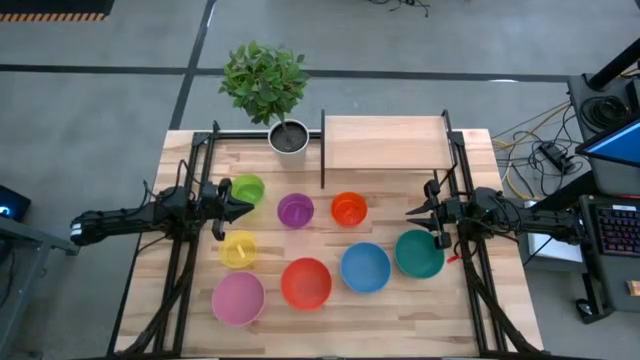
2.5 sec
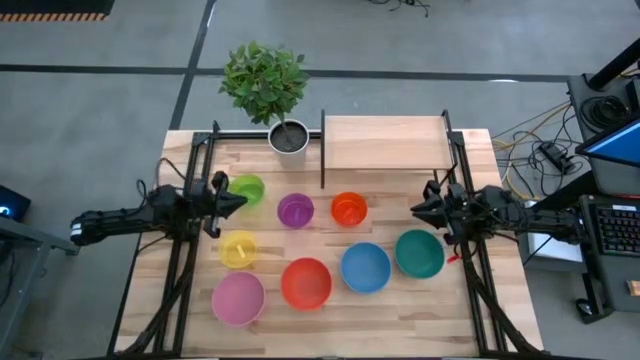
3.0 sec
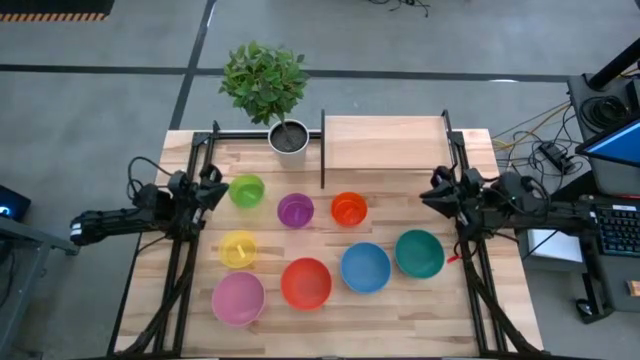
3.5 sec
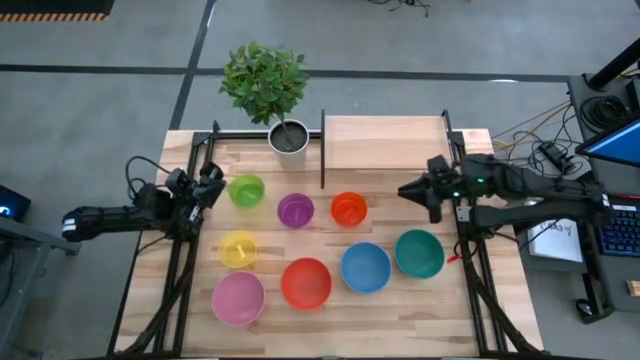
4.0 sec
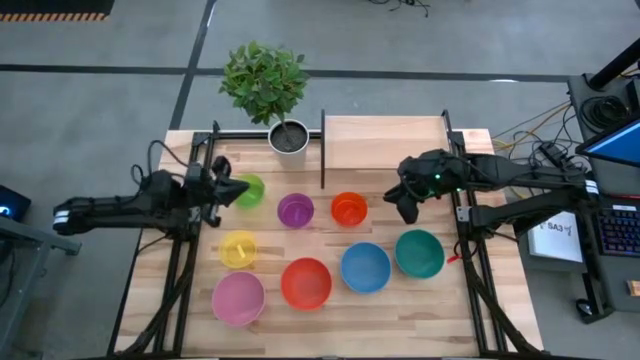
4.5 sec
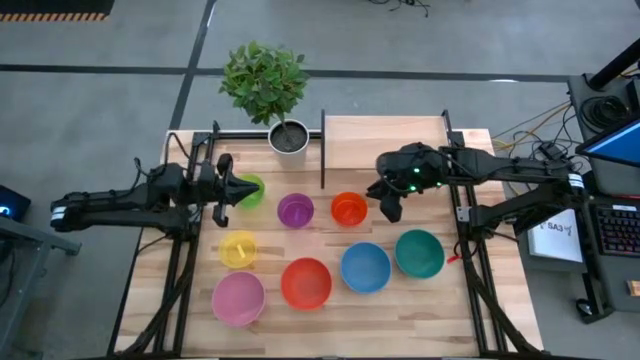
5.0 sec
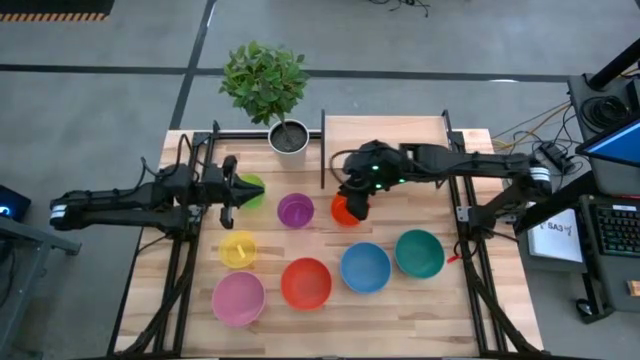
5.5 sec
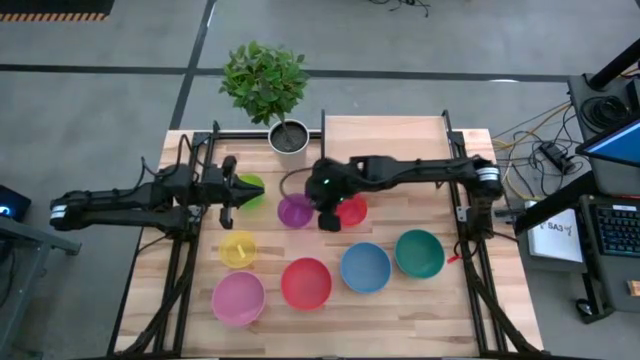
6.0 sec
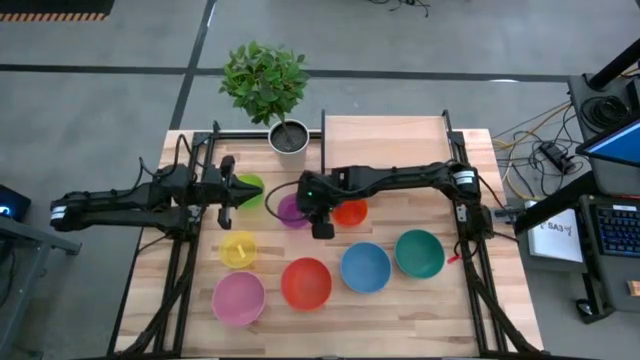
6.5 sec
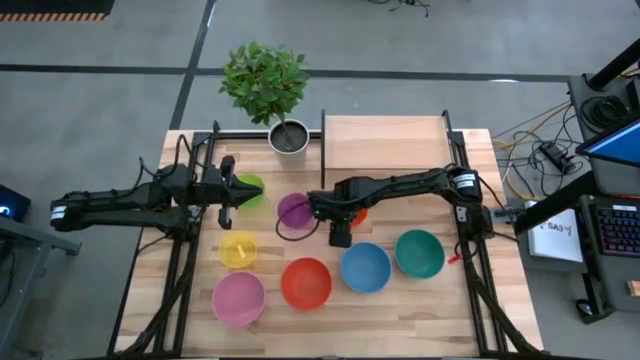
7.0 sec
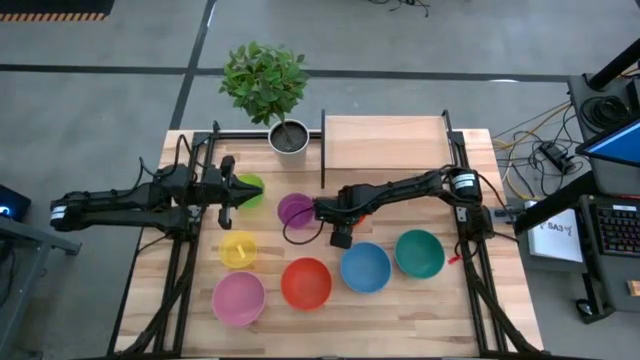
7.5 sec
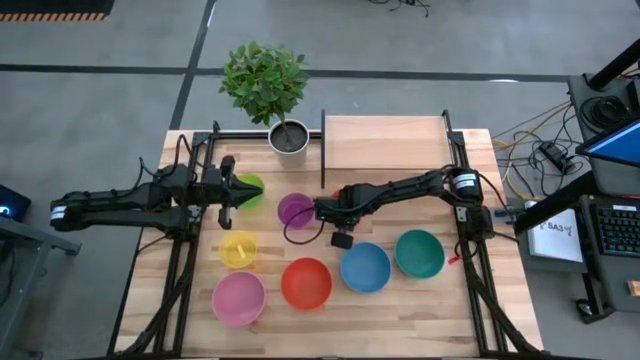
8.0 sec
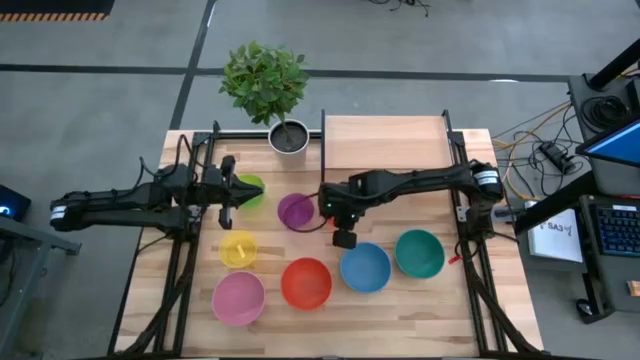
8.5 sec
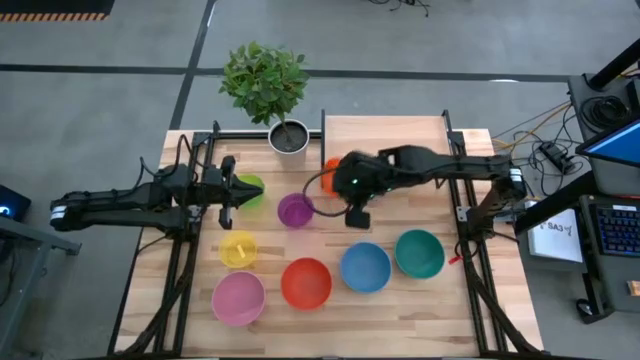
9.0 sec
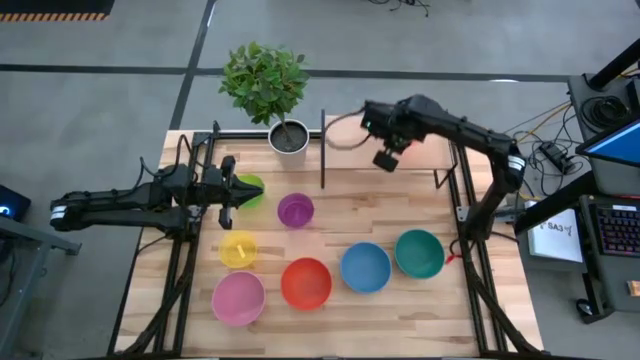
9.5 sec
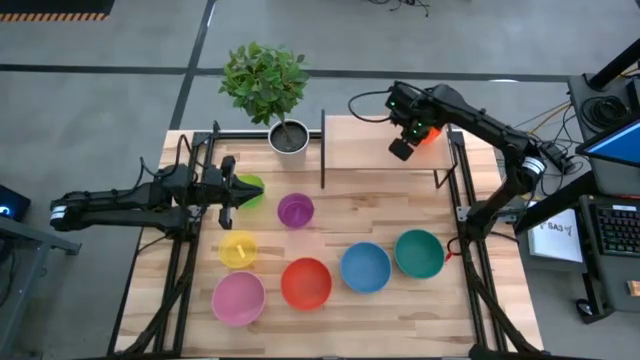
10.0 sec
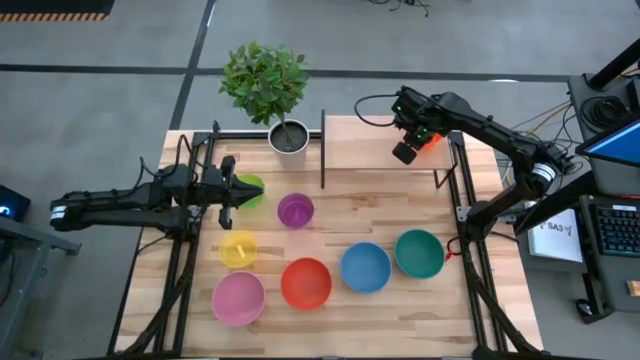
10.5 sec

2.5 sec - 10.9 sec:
Task: Place and stack bowls onto a shelf
Put the top orange bowl on the shelf

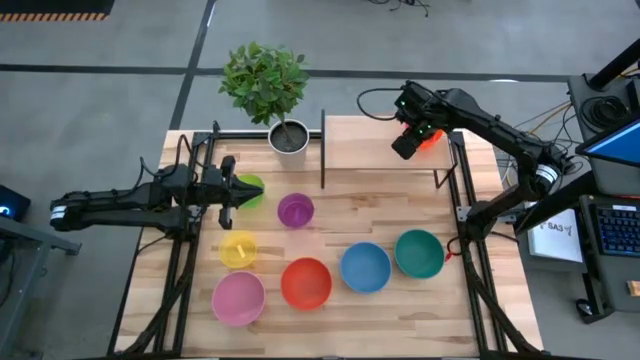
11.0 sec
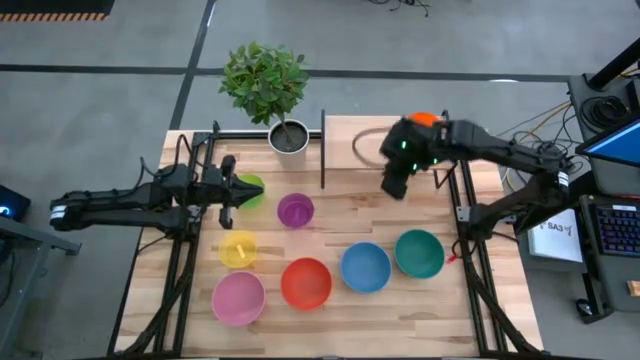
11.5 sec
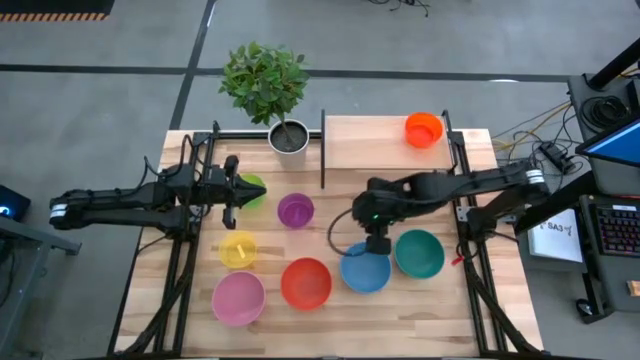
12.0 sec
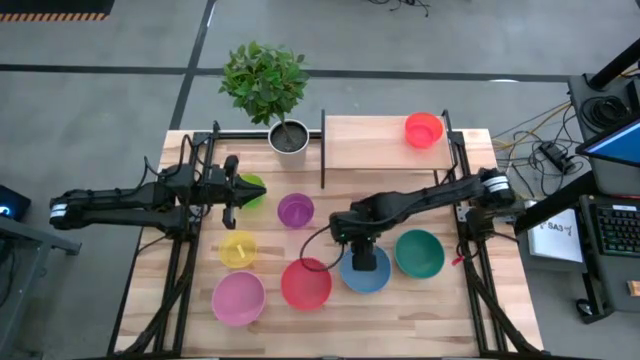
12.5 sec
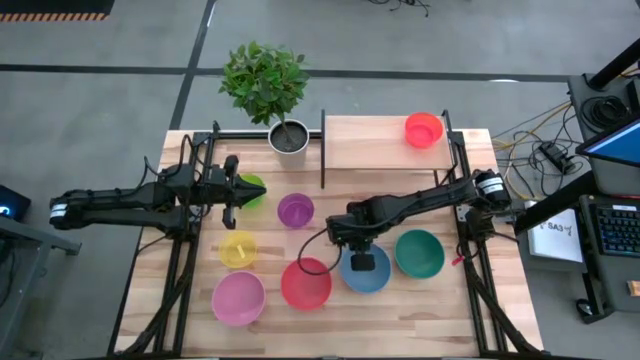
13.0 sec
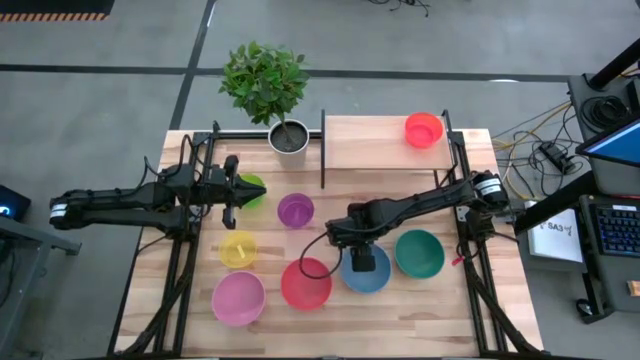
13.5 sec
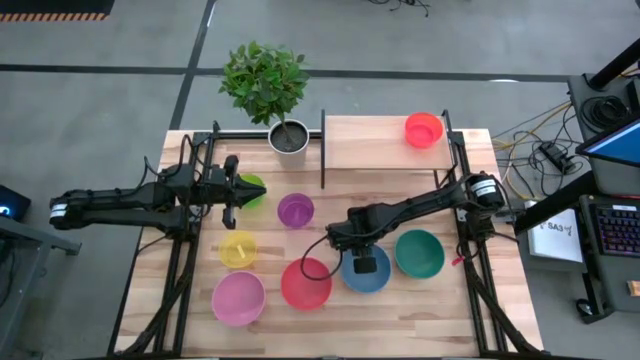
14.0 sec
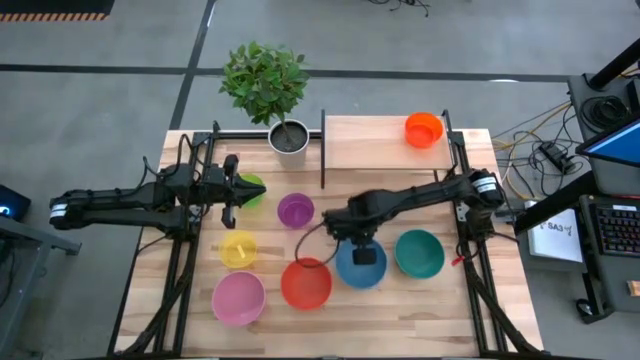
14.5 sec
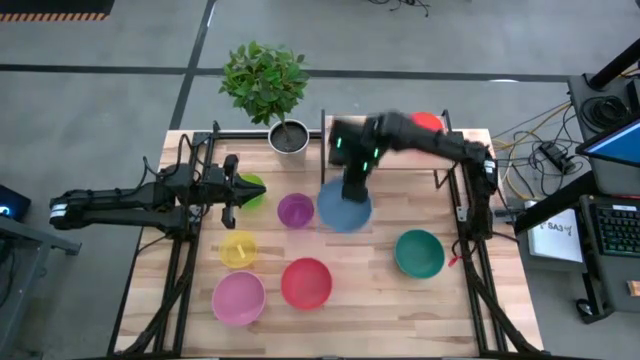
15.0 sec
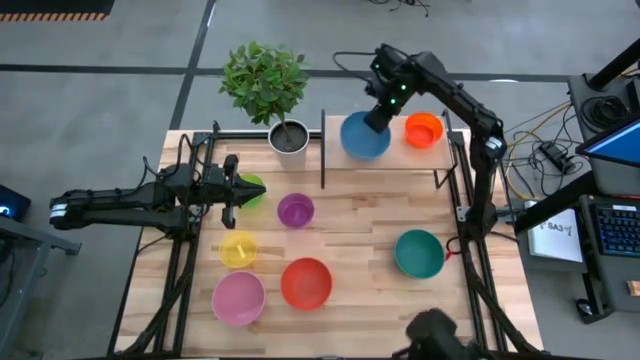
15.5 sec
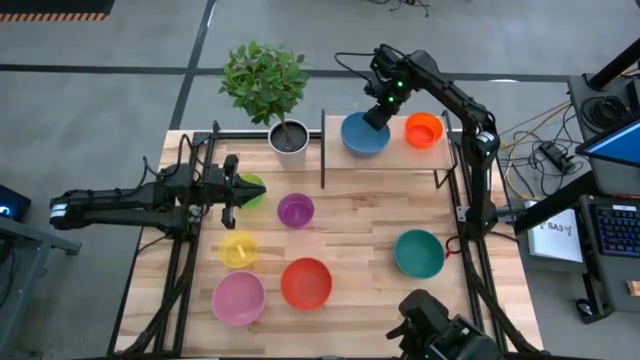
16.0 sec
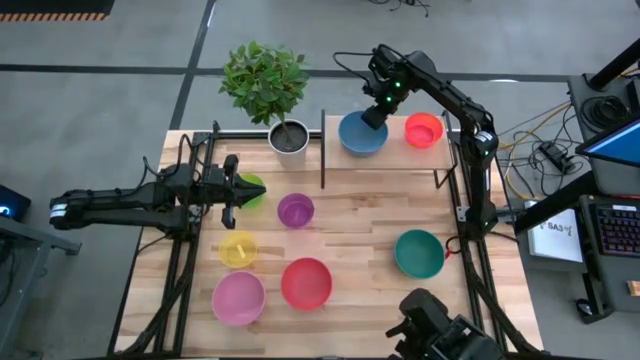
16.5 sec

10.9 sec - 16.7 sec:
Put the blue bowl on the shelf

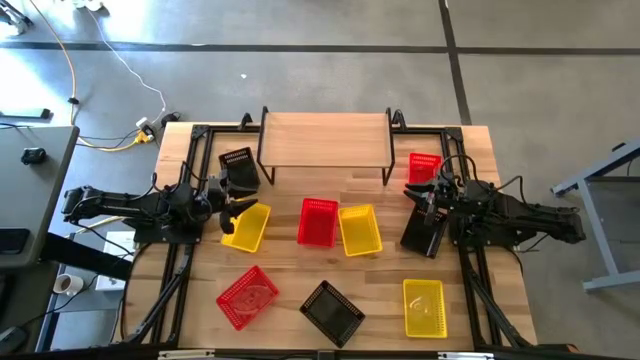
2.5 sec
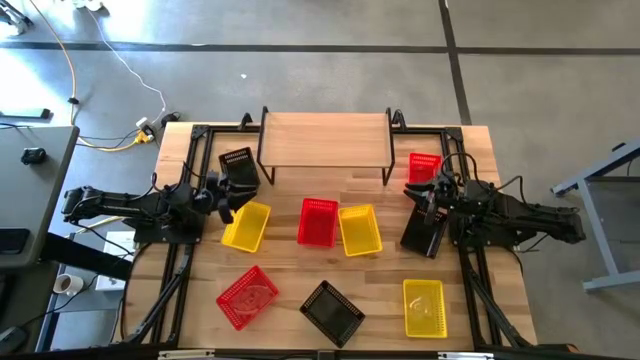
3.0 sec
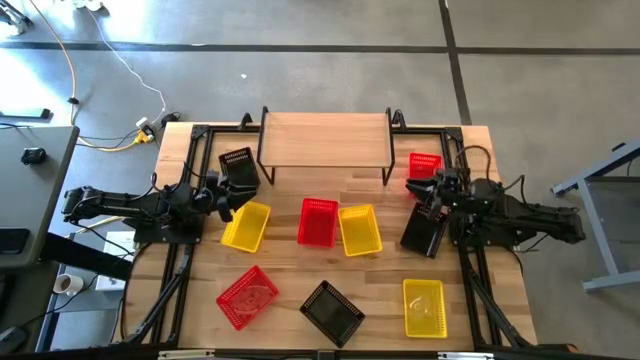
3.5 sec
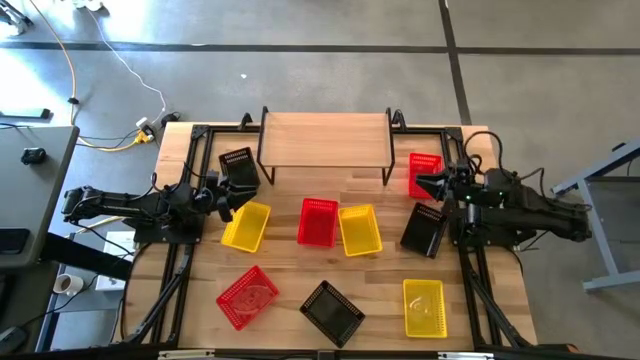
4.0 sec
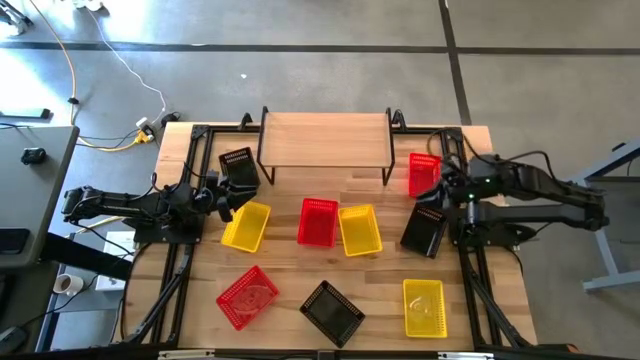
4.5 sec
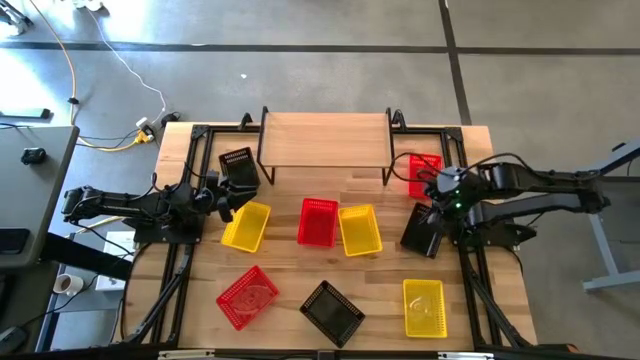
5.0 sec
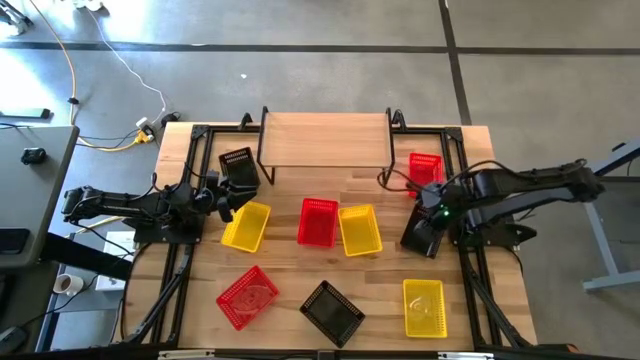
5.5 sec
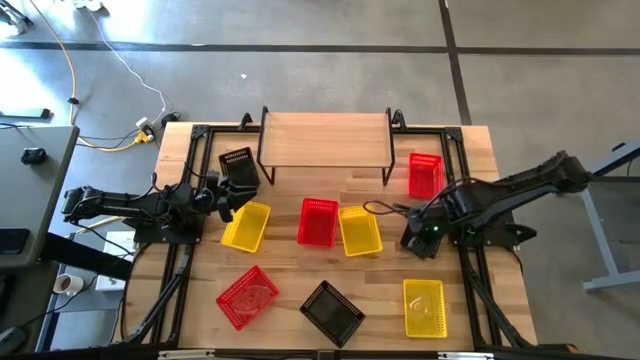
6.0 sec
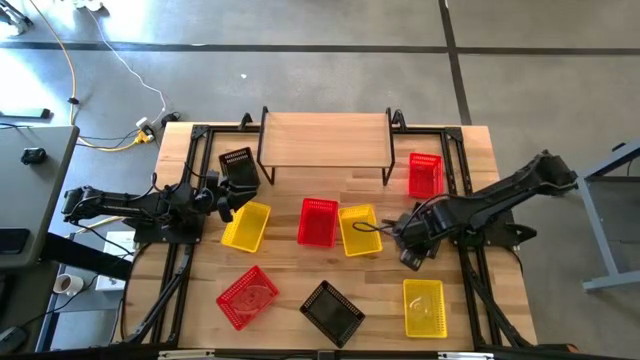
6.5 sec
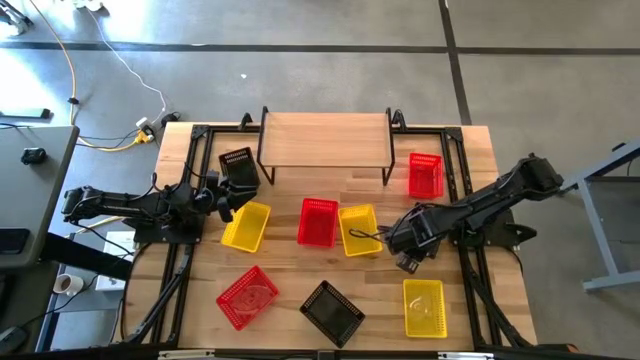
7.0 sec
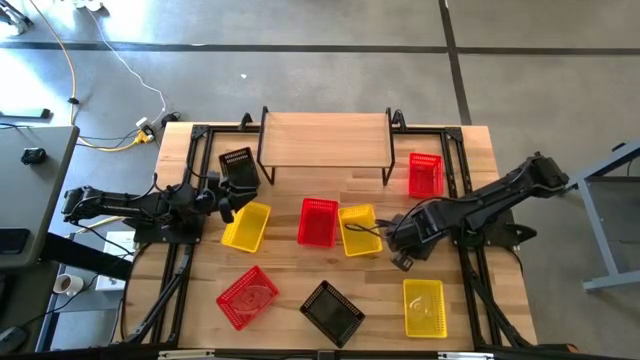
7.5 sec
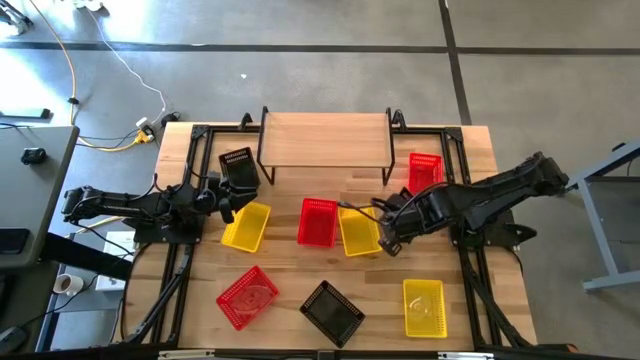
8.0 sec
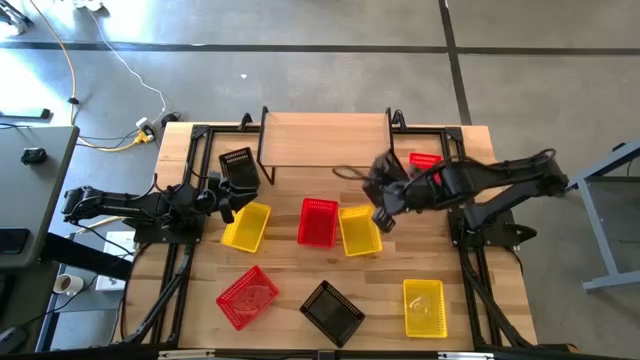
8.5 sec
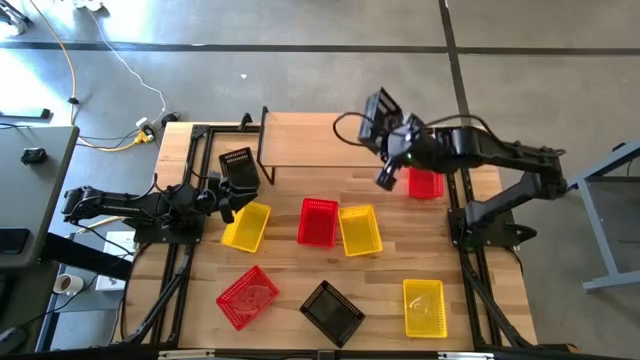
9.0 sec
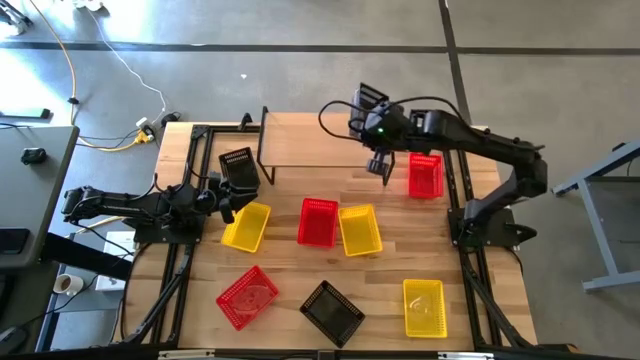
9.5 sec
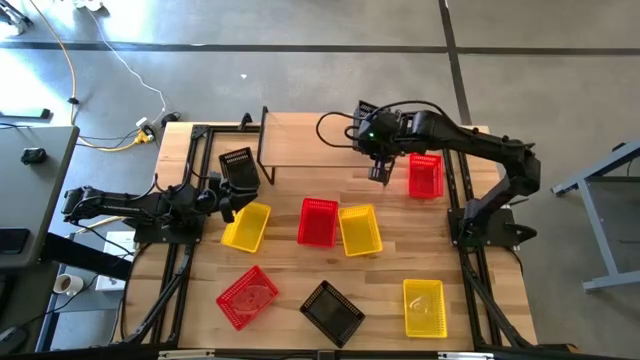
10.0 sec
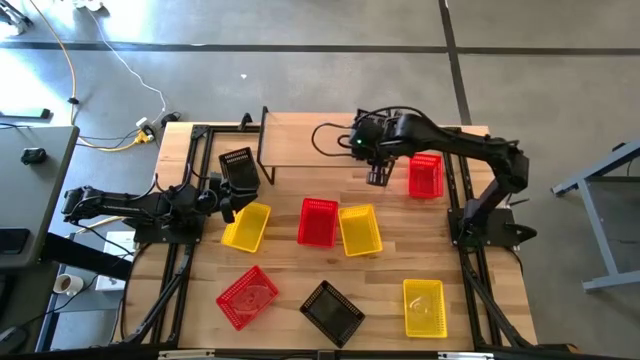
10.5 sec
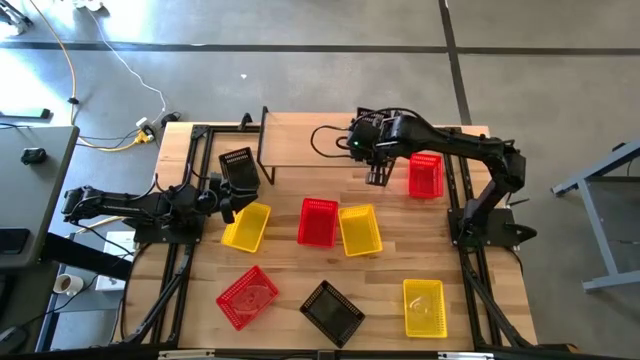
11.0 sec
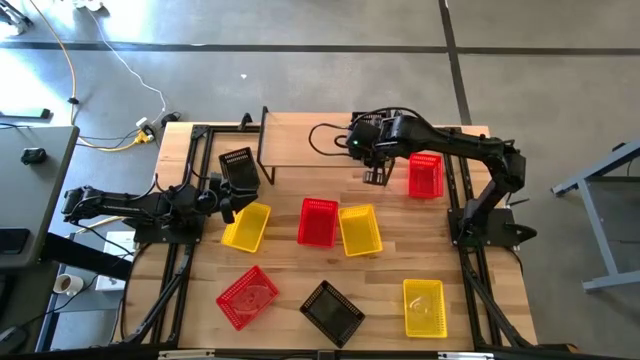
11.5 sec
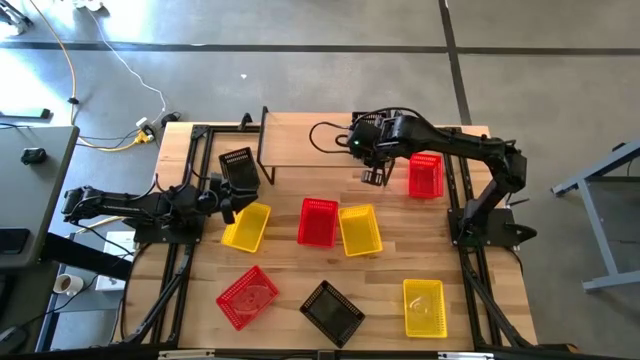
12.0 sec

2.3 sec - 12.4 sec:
Task: Stack baskets on shelf by color
Put the middle black bin on the shelf
